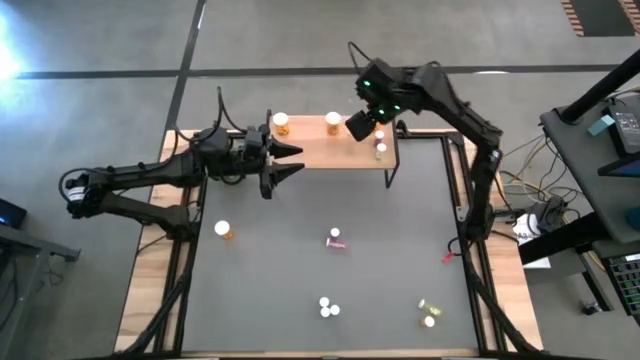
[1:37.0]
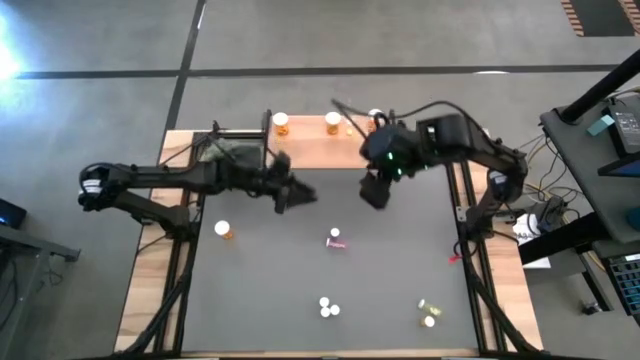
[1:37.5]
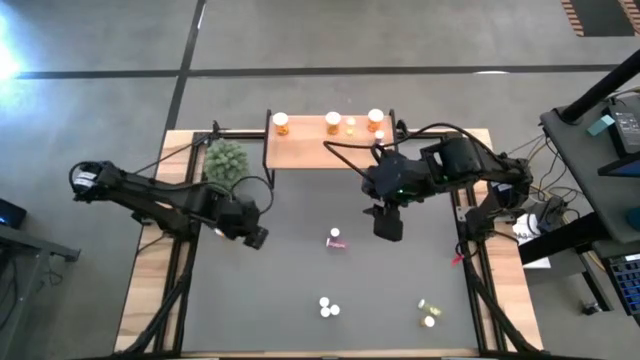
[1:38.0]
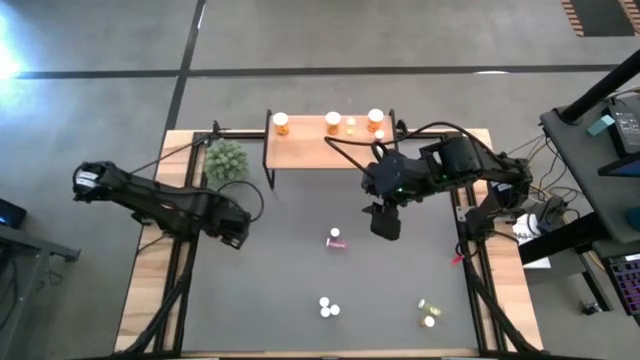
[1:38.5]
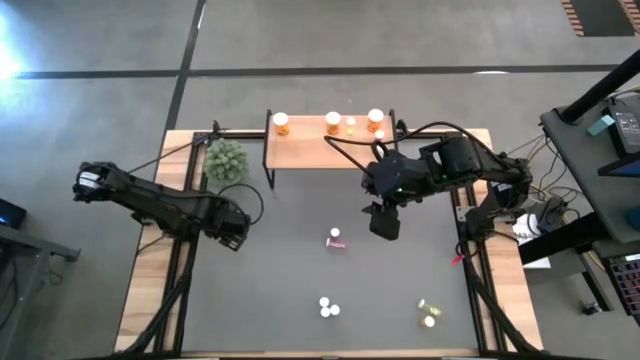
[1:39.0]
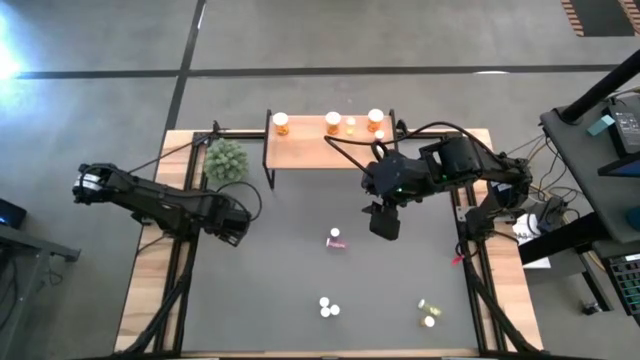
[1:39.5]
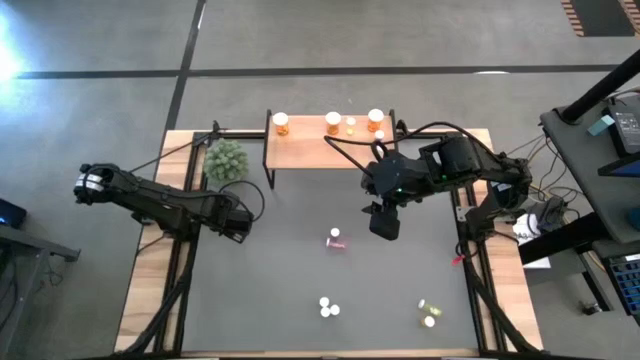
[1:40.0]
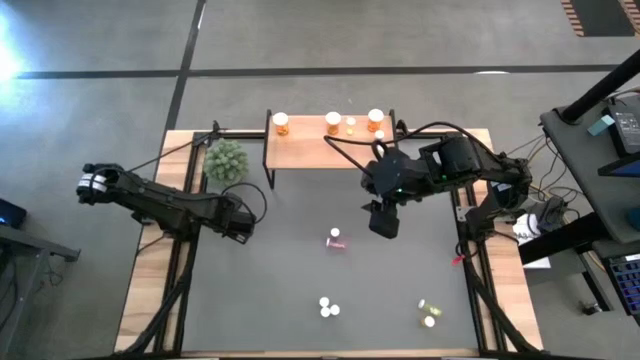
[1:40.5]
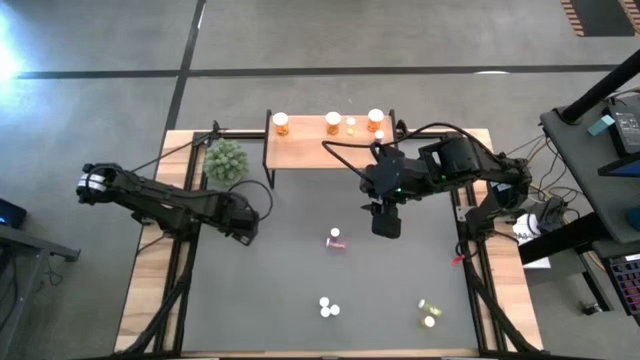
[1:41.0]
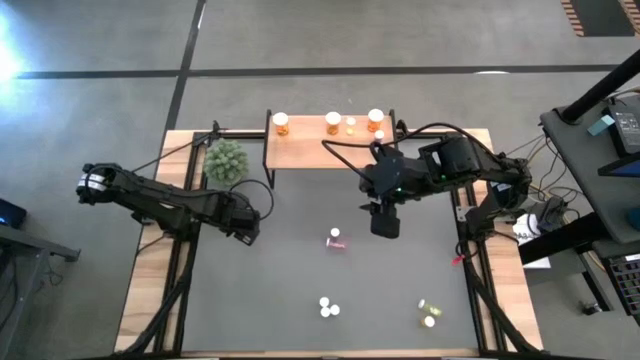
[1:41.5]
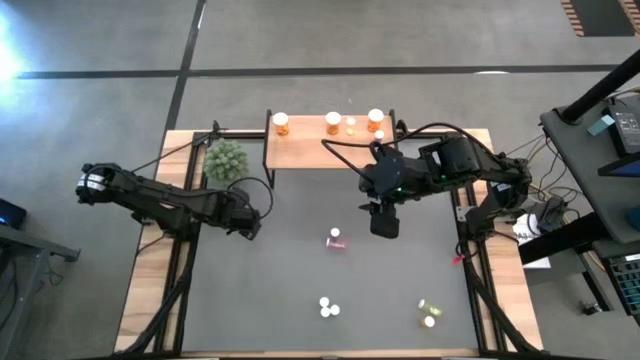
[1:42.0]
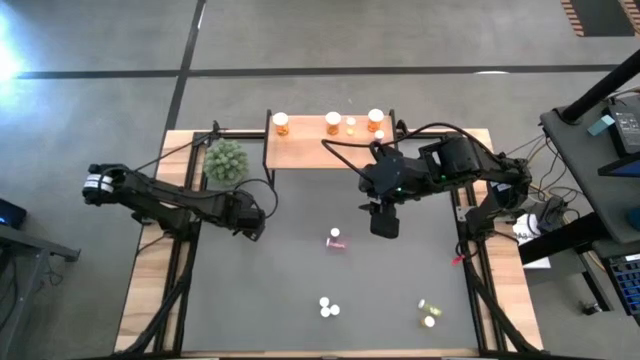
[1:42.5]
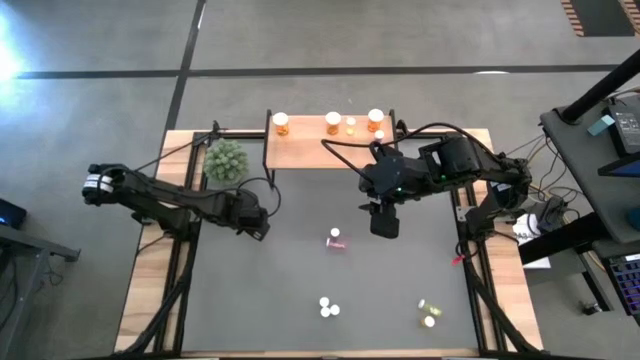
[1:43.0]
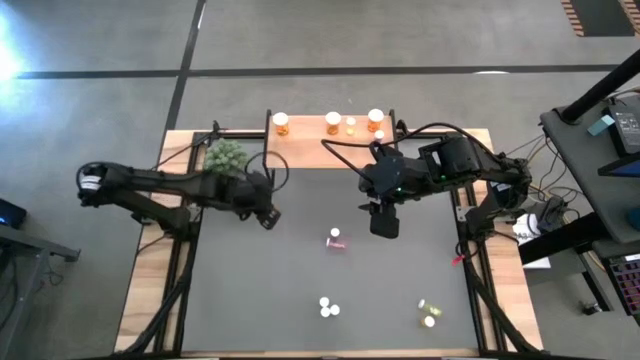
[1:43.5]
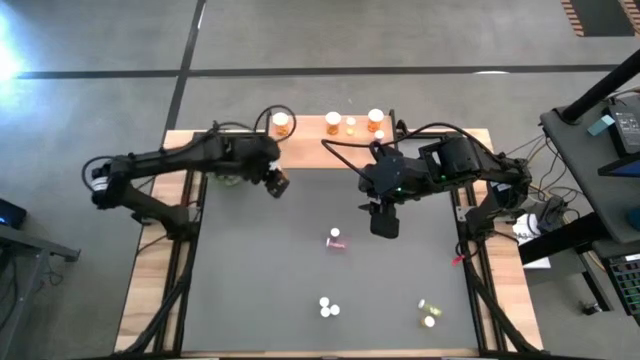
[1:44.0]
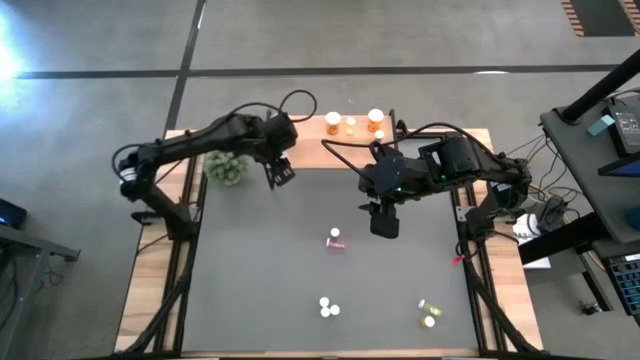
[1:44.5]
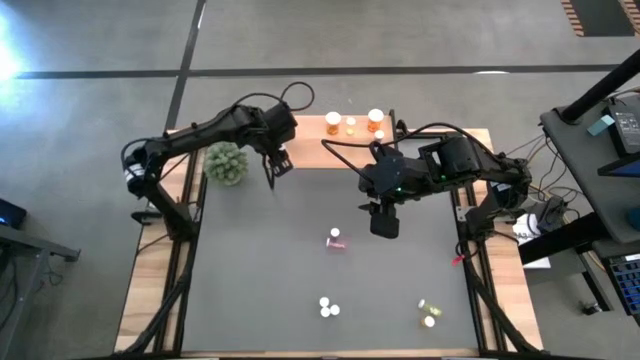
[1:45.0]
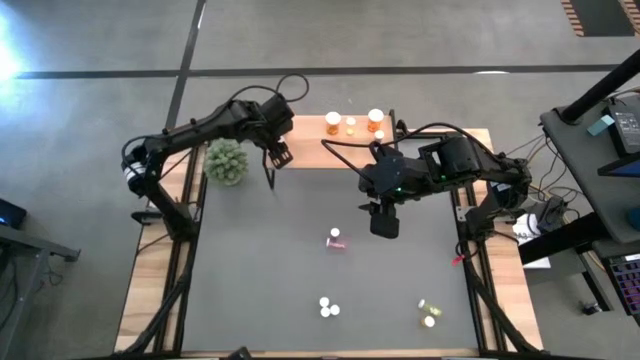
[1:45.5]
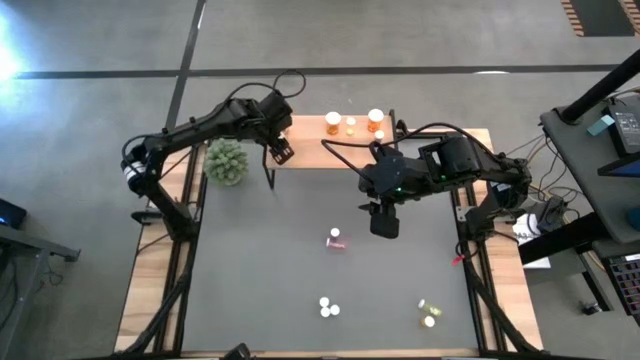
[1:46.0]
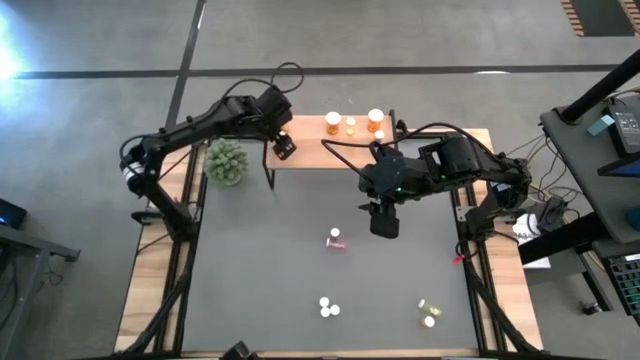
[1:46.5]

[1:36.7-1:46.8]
Task: Pick and place medicine bottles onto shelf by color
Put the large orange pill bottle on the shelf

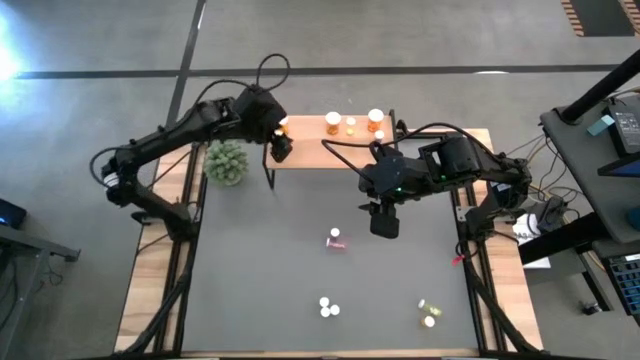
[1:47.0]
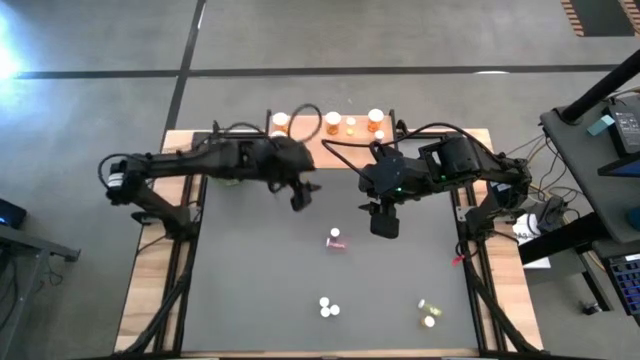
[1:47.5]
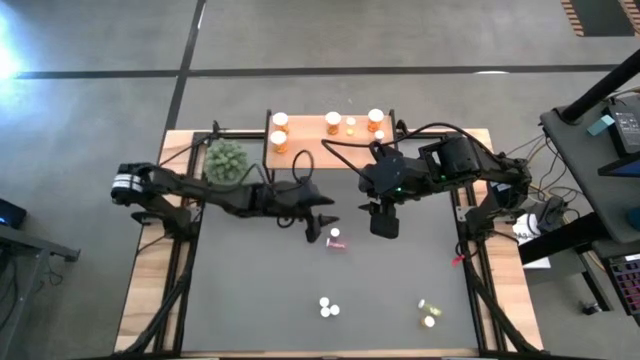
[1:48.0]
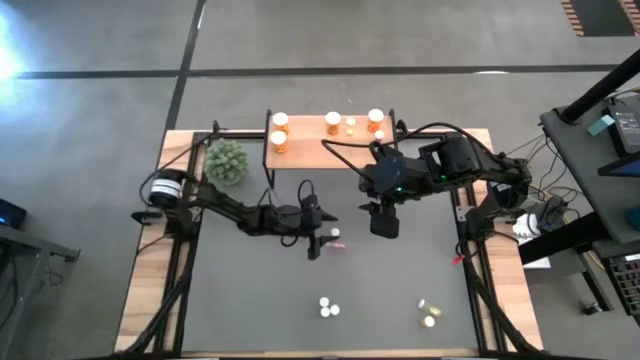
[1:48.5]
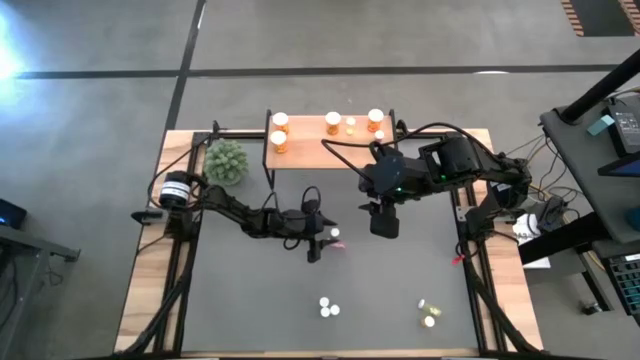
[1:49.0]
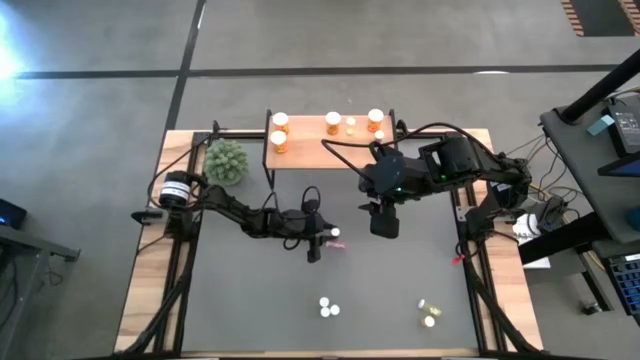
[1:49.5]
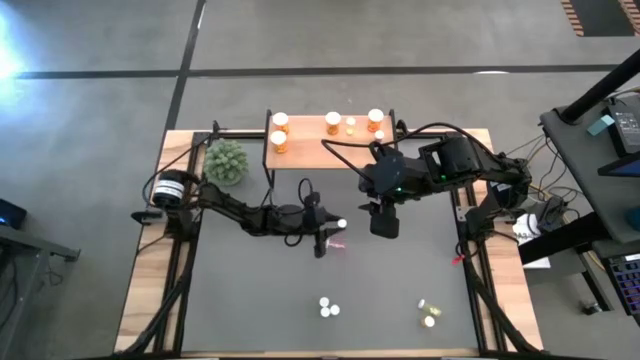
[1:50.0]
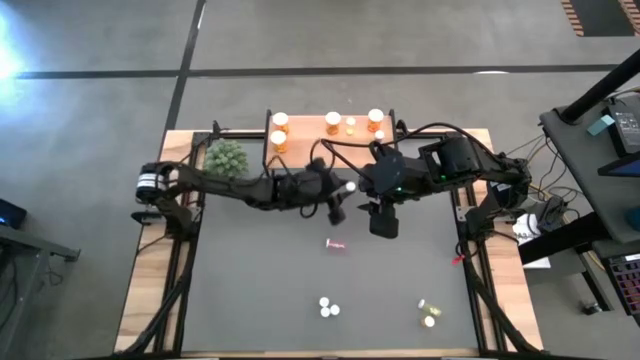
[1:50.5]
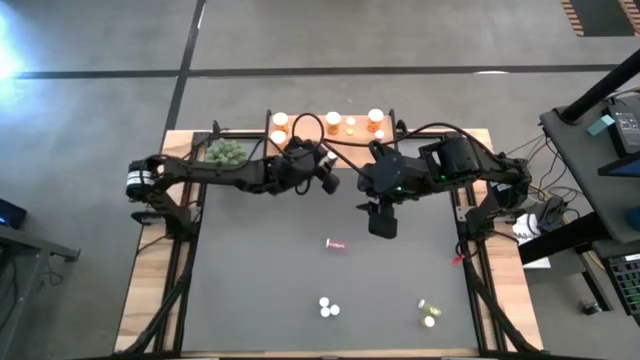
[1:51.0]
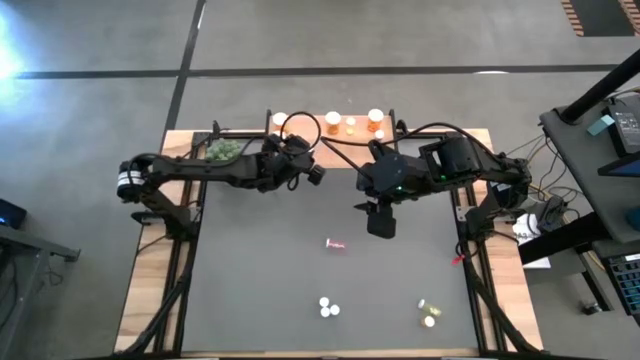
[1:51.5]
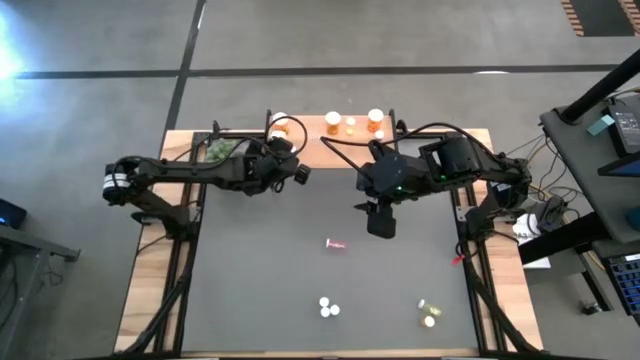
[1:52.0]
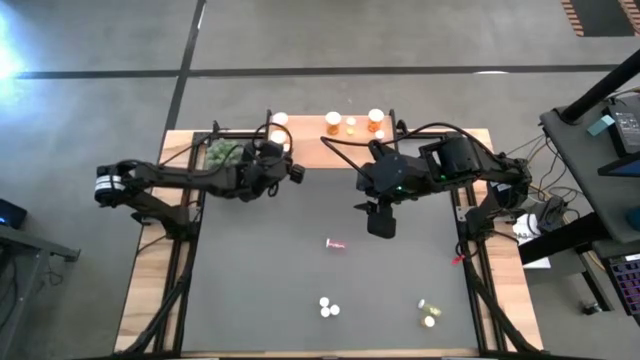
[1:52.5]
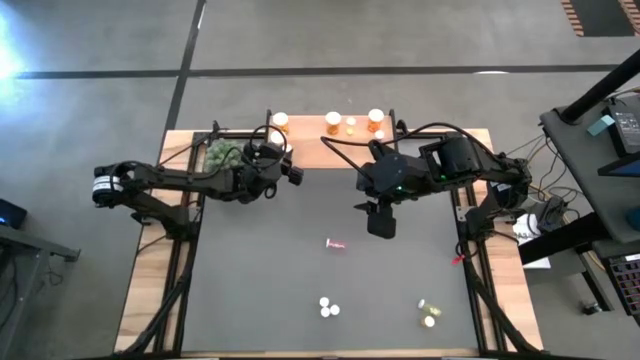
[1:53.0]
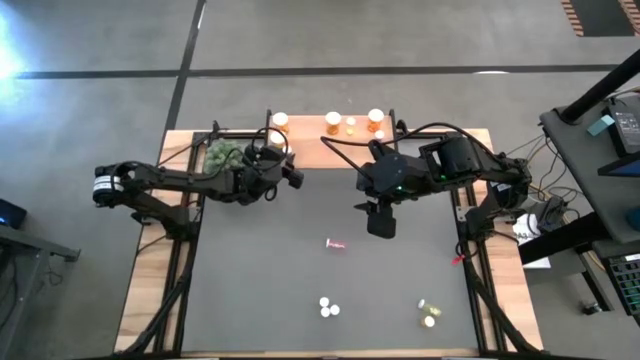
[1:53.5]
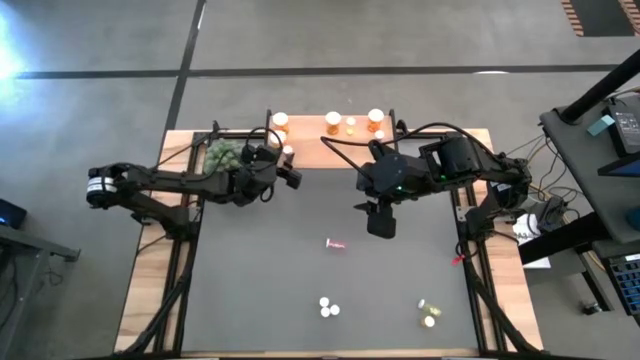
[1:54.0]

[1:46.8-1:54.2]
Put the small blue pill bottle on the shelf

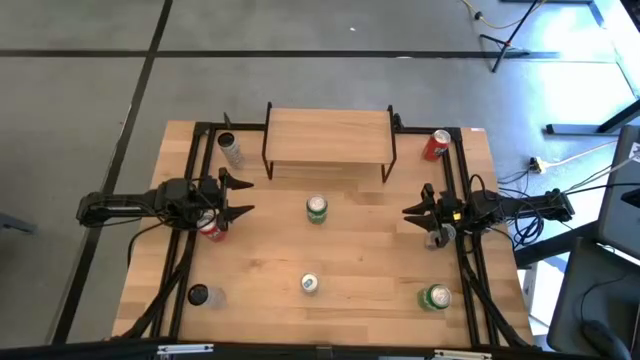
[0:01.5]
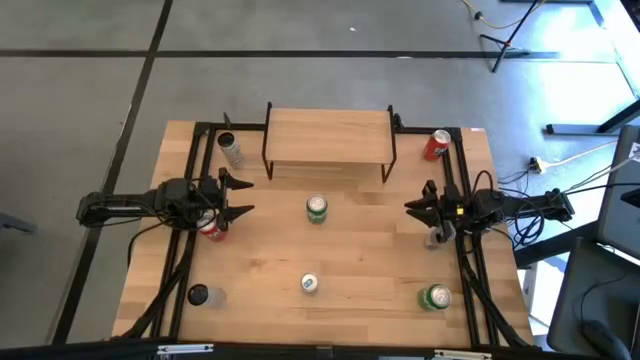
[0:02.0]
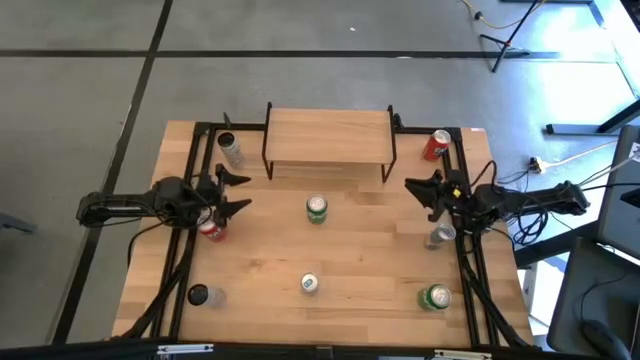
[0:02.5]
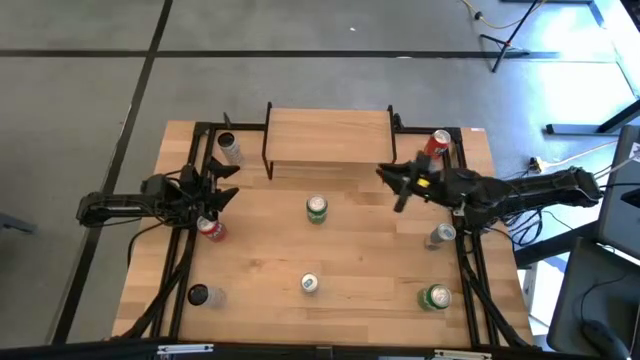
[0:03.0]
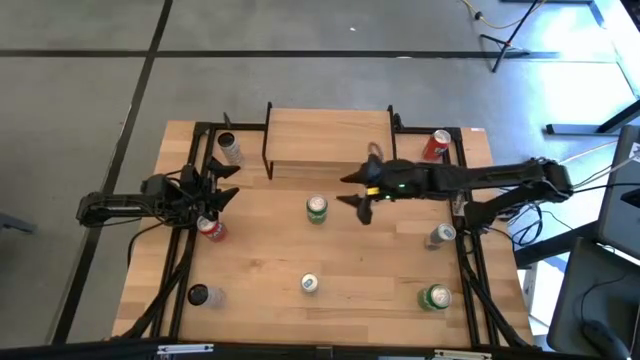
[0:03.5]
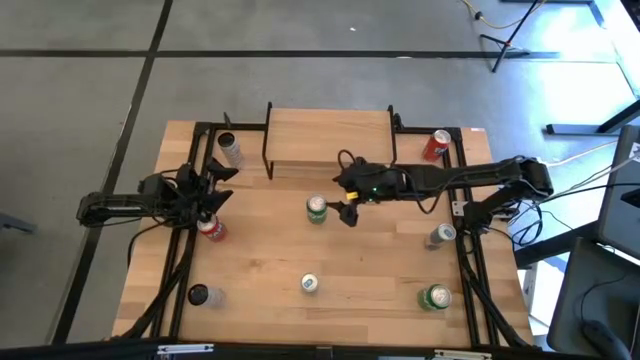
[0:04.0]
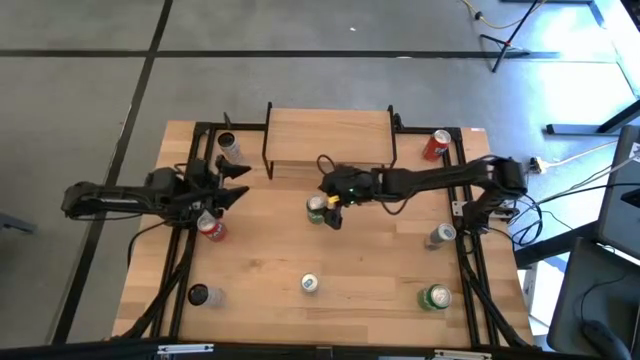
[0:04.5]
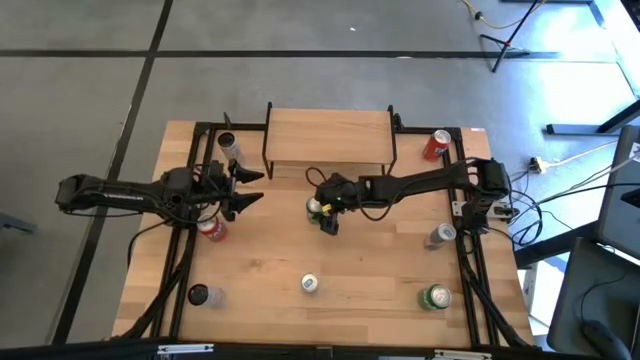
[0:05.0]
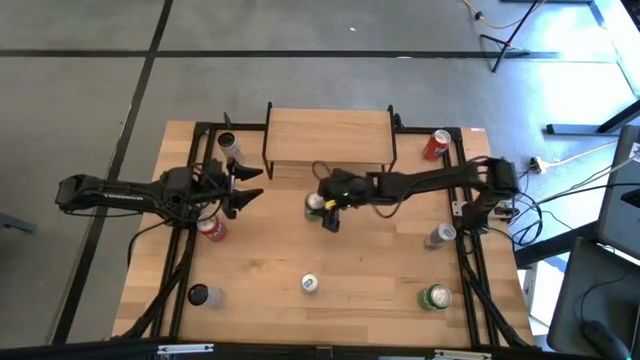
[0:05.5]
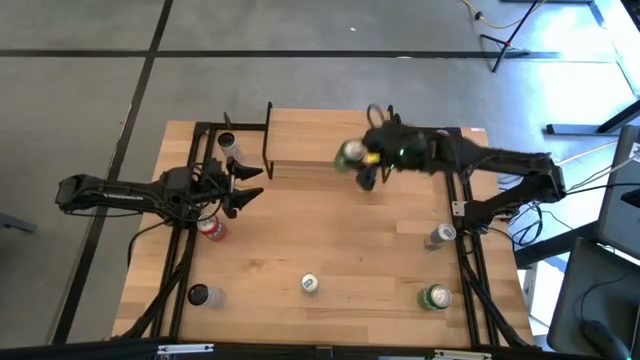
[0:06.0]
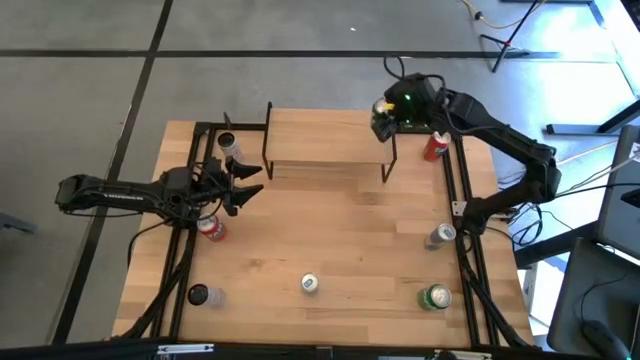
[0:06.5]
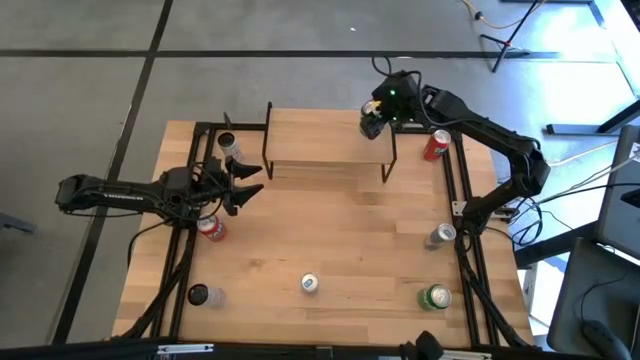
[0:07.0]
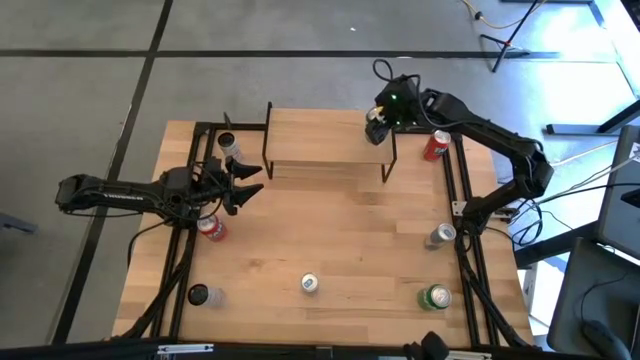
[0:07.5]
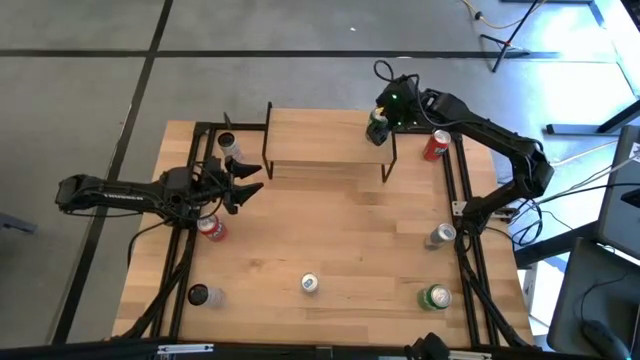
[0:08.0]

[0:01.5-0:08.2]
Task: Place canned beverage on shelf
Put the top green soda can on the shelf
